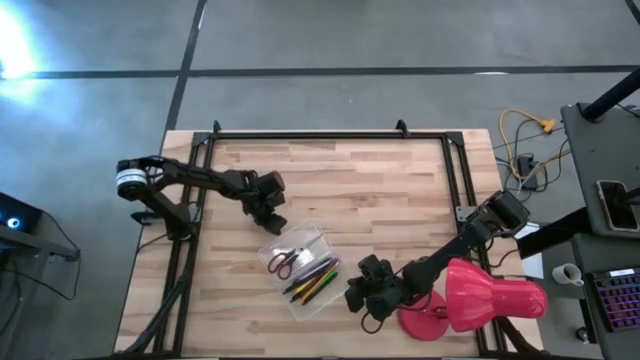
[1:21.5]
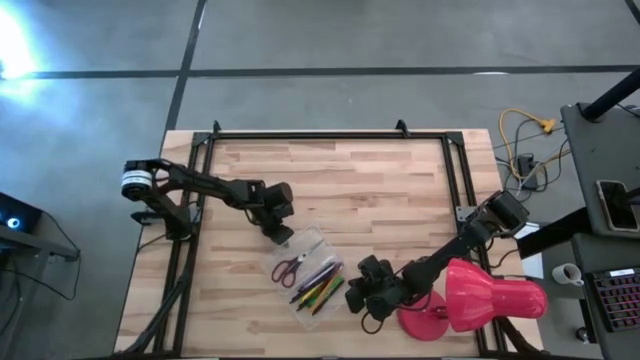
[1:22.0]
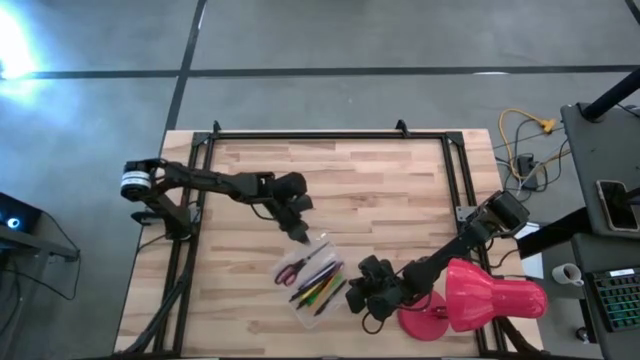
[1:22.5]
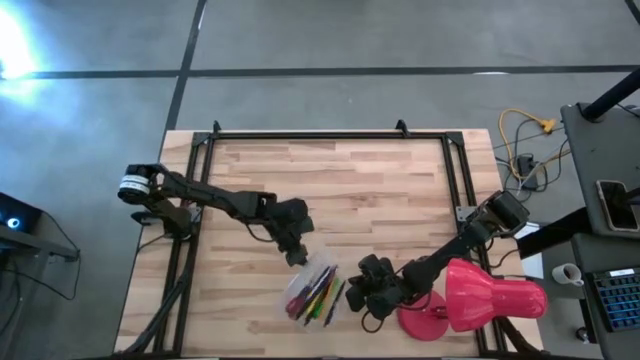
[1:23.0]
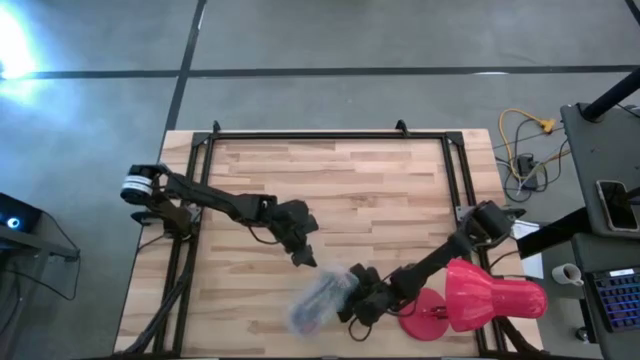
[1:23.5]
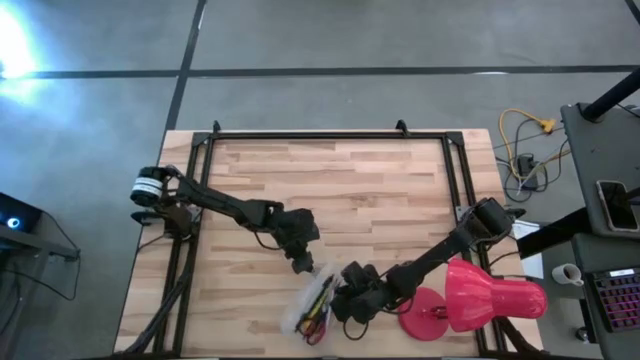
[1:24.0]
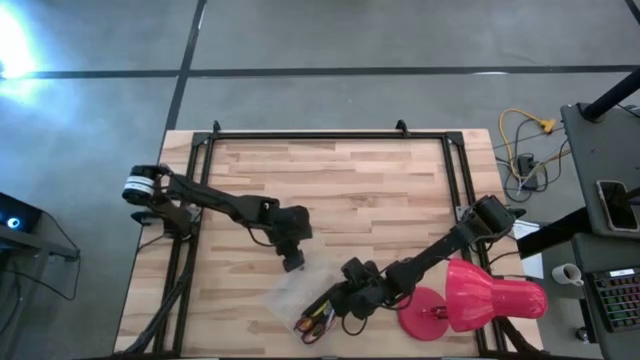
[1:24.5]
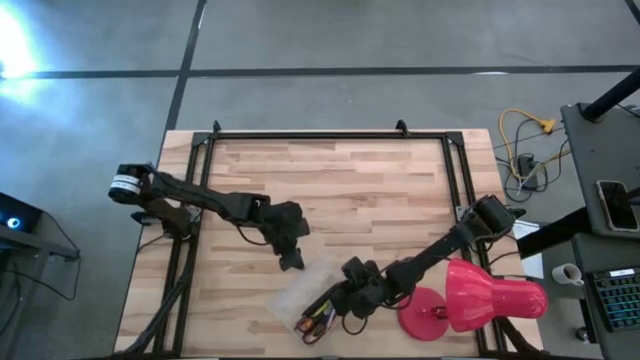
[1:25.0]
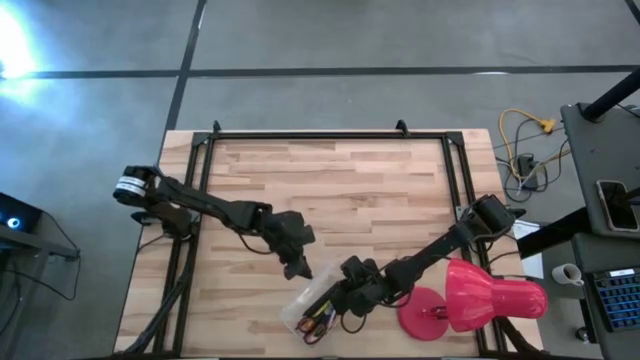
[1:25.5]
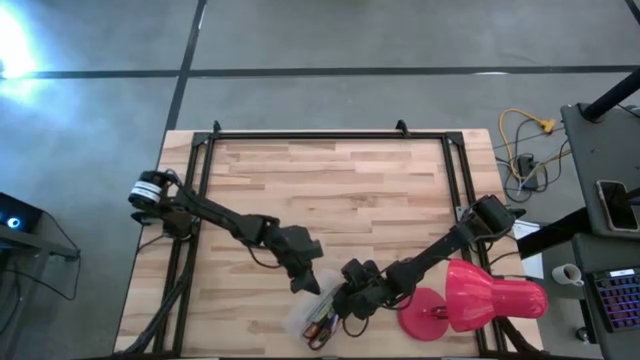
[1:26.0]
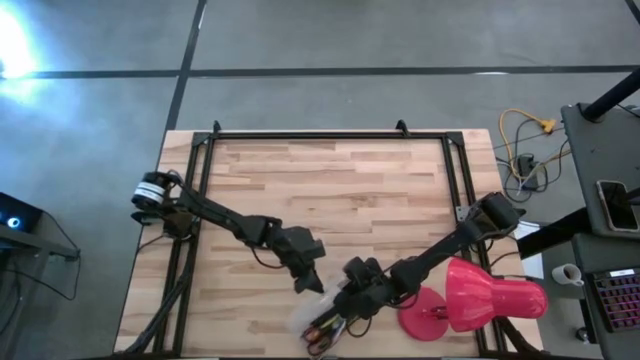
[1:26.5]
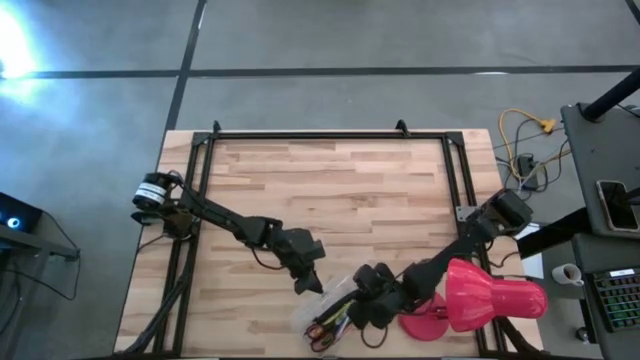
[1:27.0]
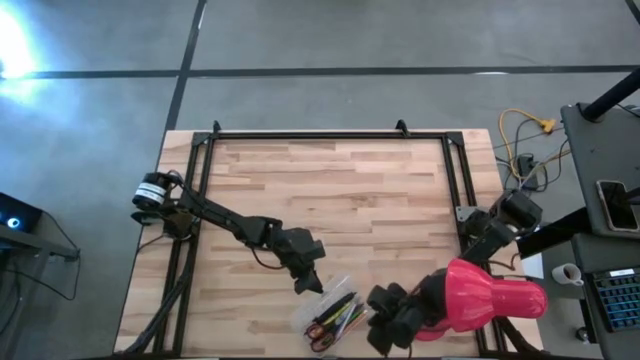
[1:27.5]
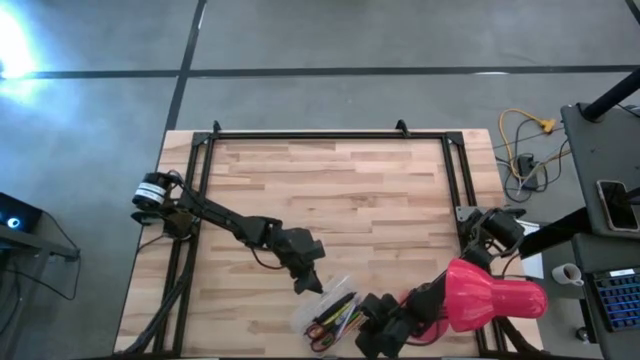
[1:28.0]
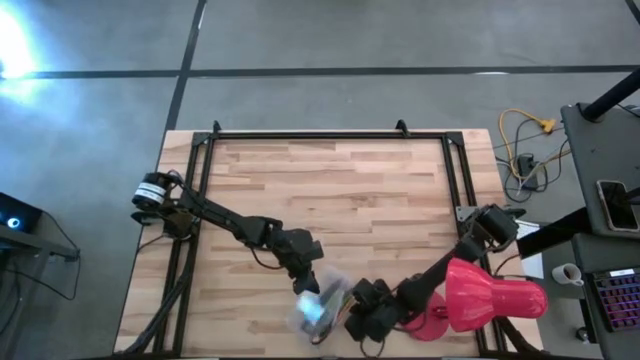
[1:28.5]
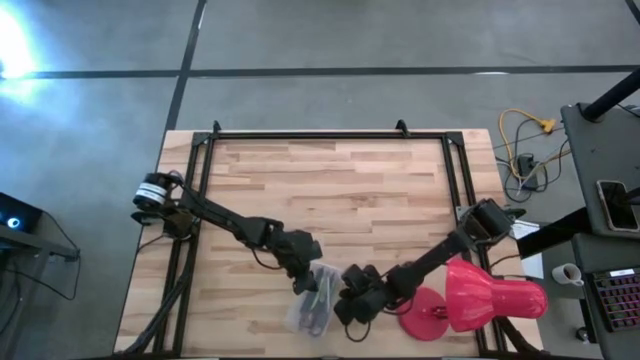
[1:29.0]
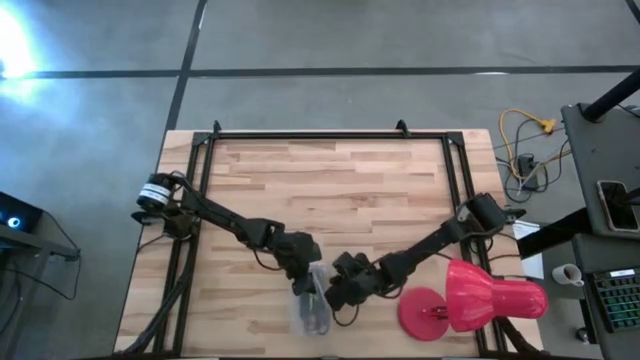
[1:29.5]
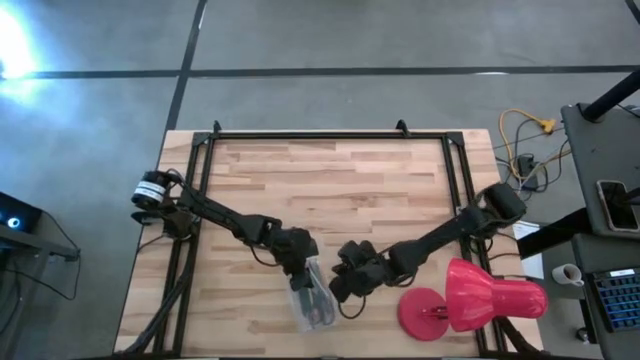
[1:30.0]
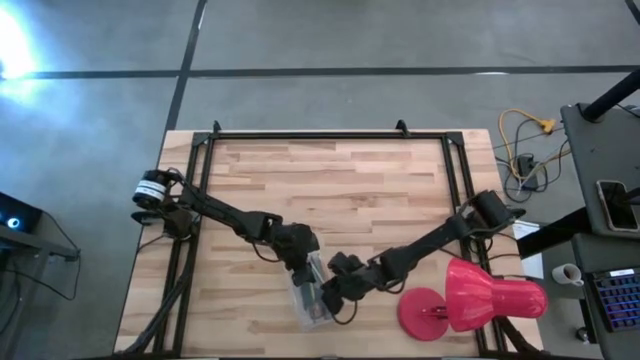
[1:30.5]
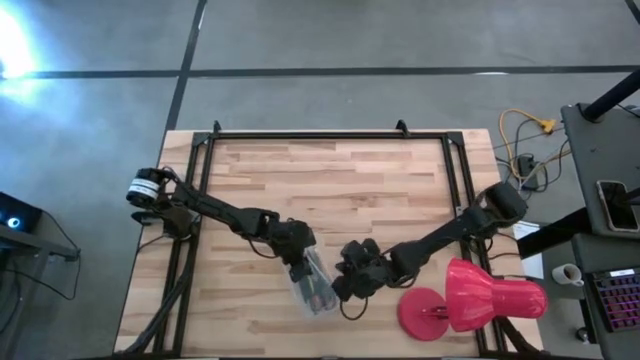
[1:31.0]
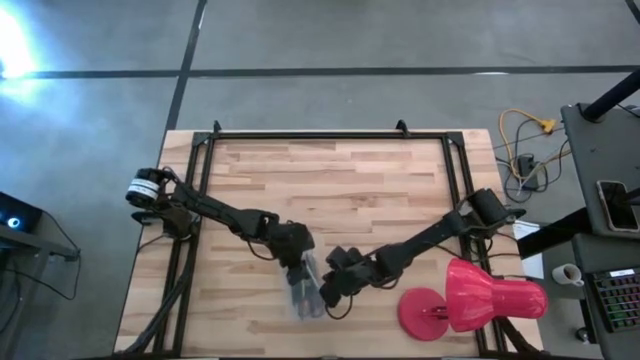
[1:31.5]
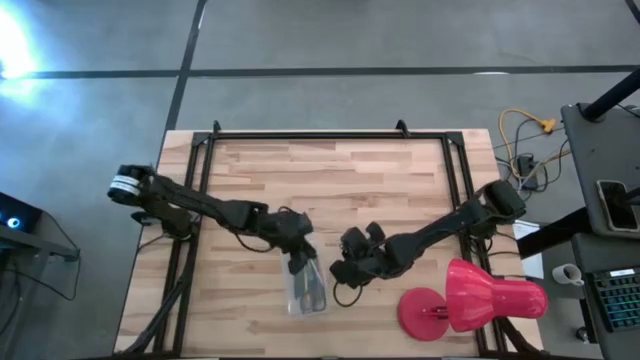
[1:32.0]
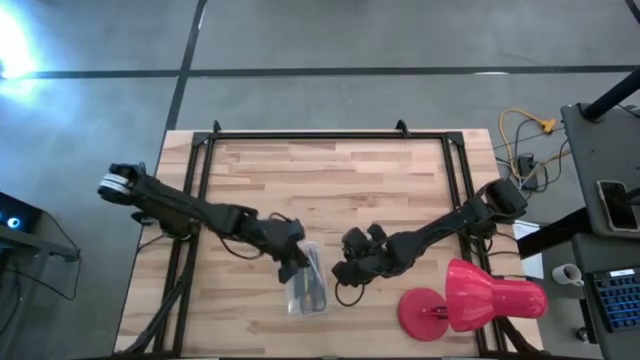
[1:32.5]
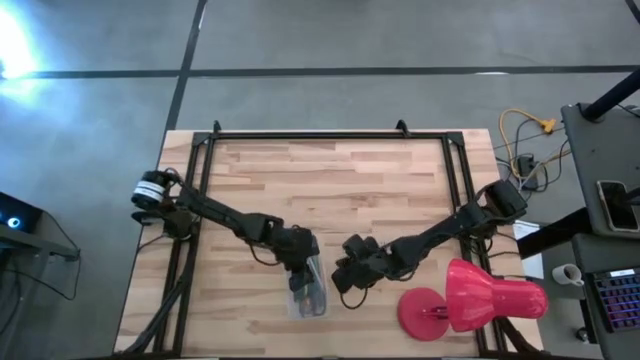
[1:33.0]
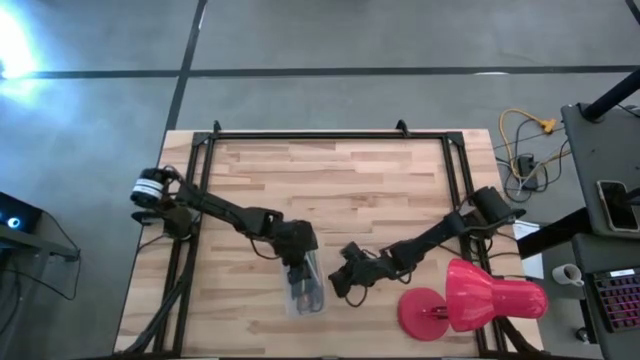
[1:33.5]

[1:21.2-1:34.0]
Task: Pick & place school supplies into a supply box
Close the stationery box

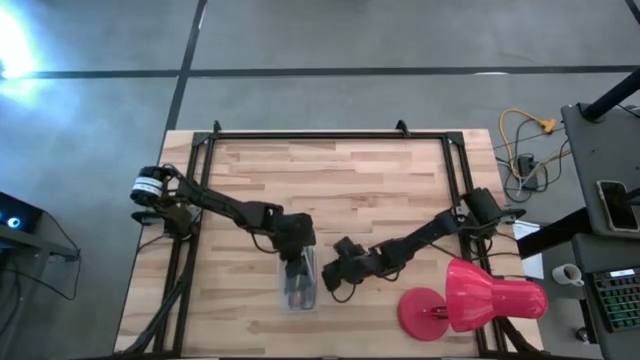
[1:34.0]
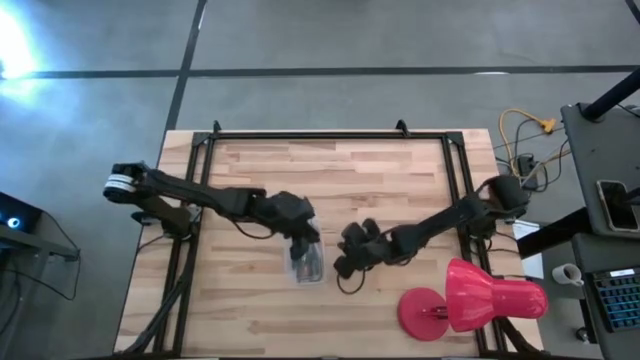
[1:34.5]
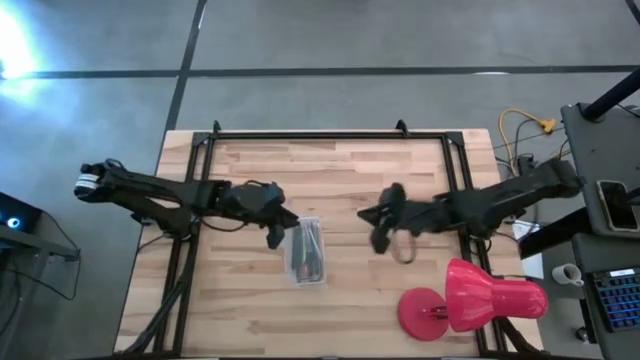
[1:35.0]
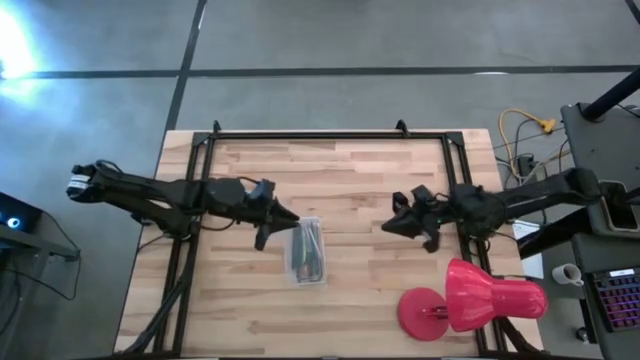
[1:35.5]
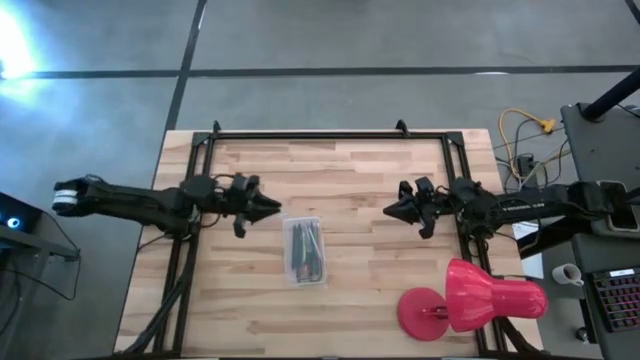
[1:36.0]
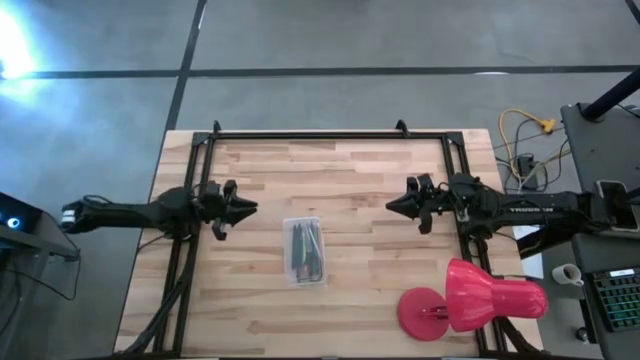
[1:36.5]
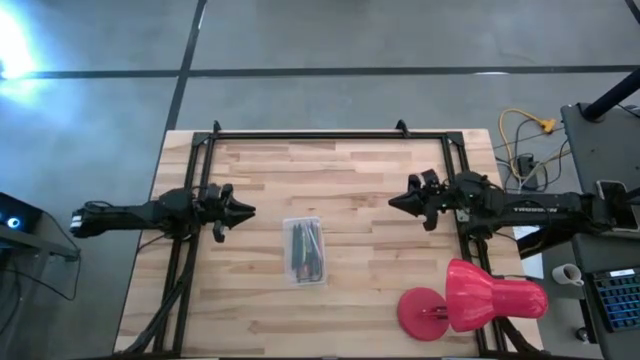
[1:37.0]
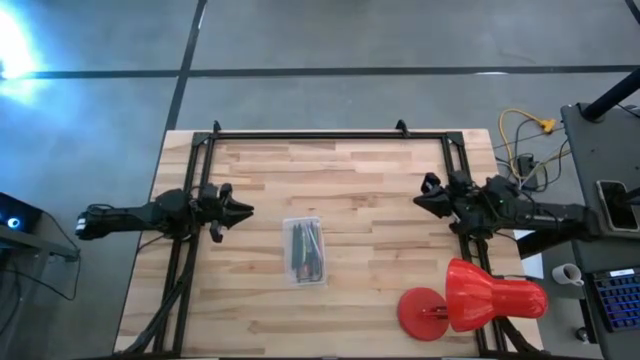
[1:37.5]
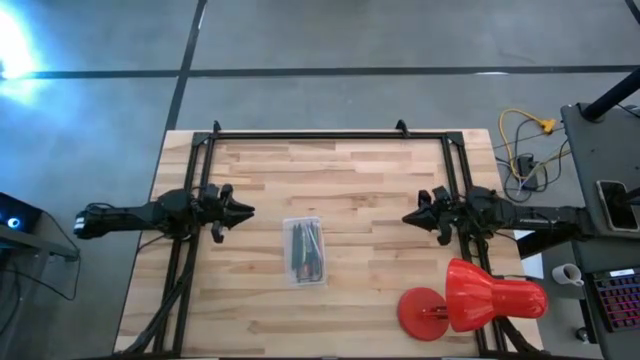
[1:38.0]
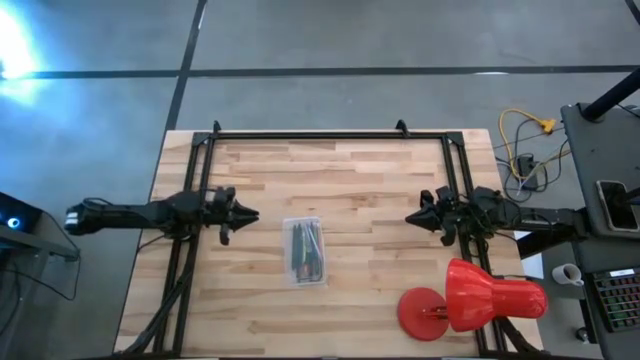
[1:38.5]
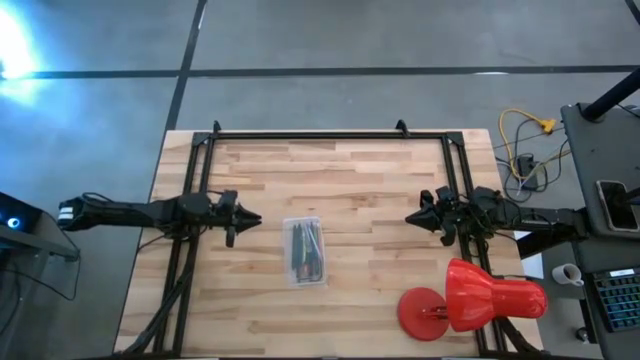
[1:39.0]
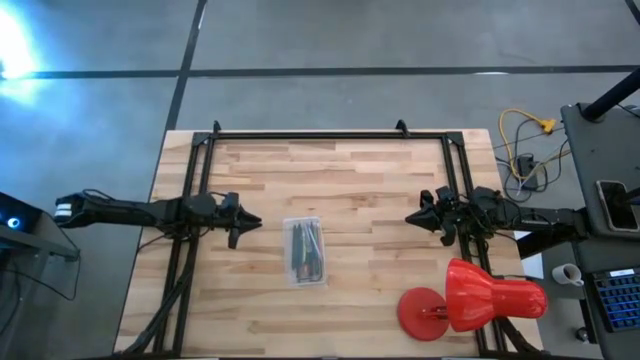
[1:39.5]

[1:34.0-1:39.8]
Return to Home Position

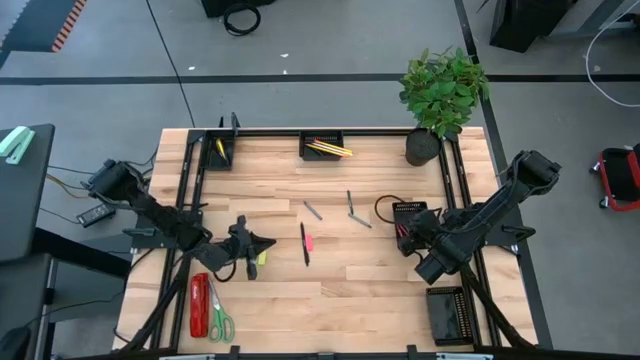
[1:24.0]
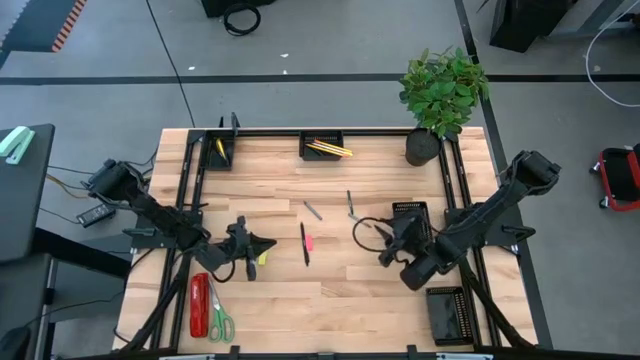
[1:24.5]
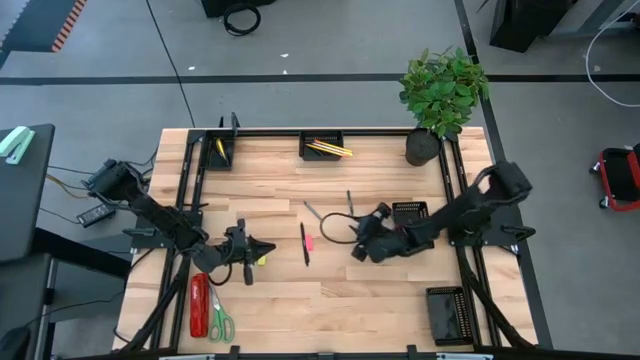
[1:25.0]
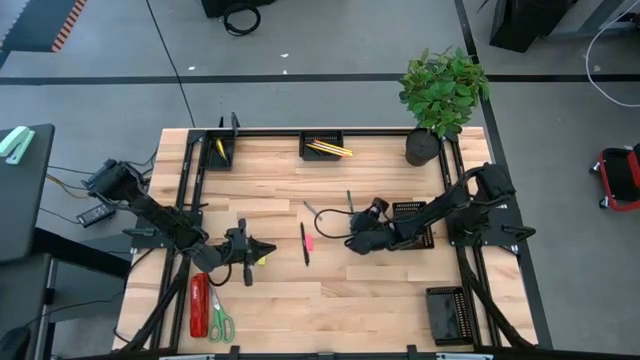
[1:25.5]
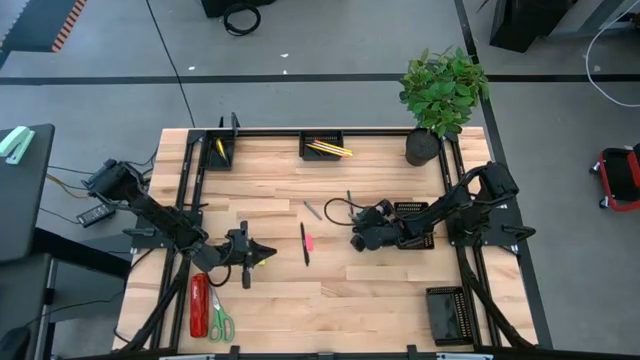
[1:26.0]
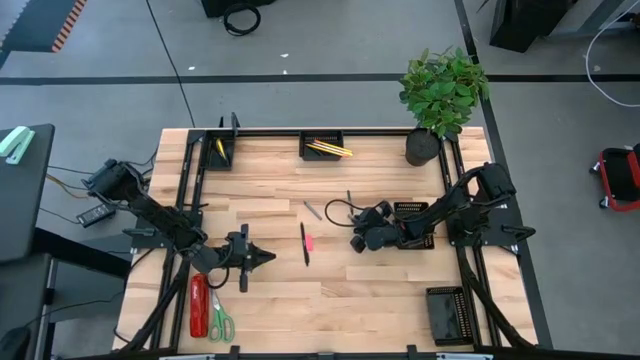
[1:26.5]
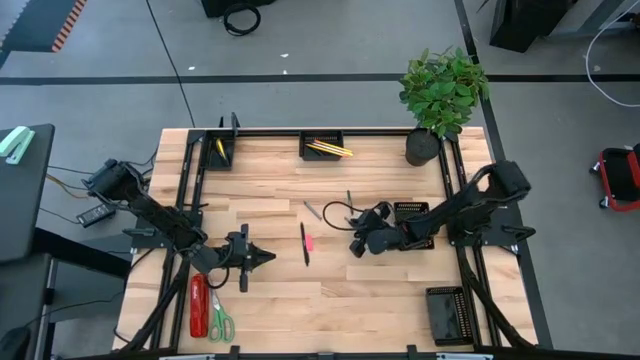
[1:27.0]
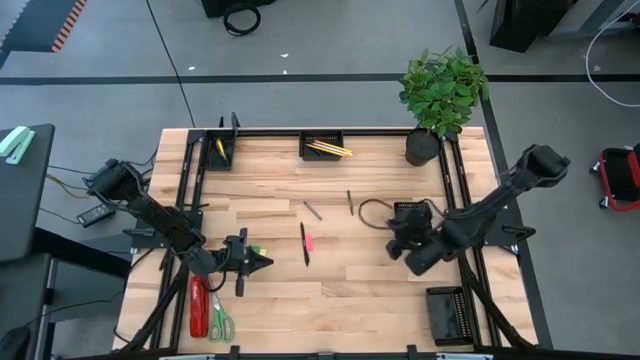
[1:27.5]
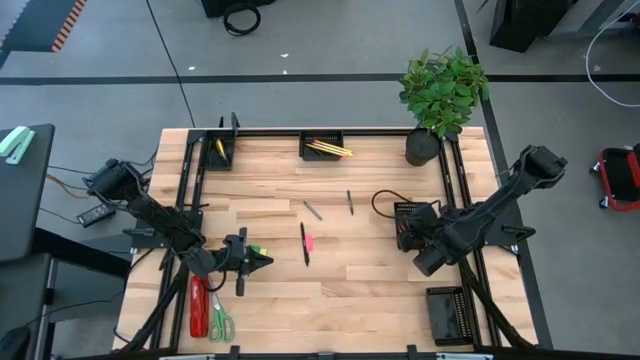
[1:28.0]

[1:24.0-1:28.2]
Task: Sort crayons/erasers/pens/pencils in bins
Put the gray crayon into the middle right black bin
